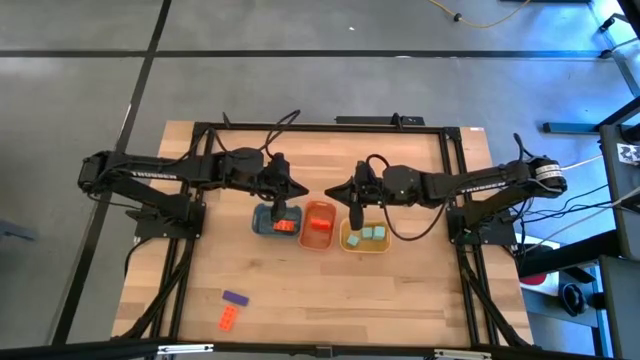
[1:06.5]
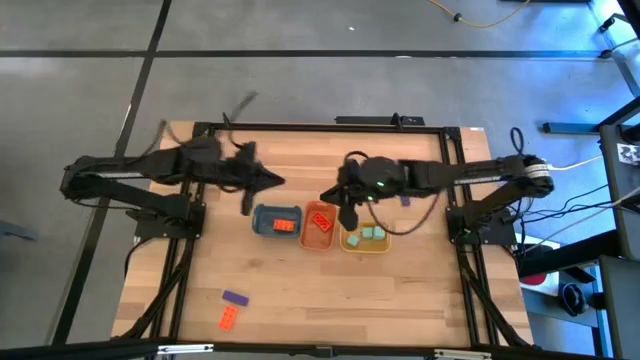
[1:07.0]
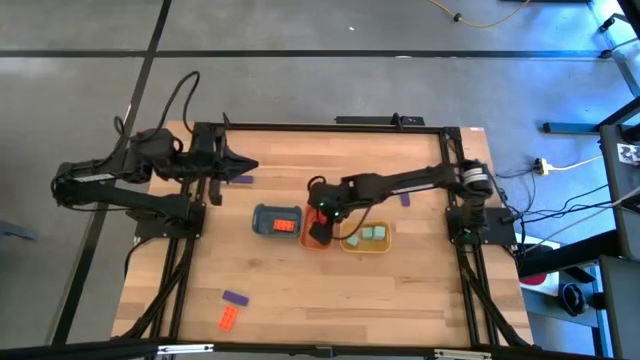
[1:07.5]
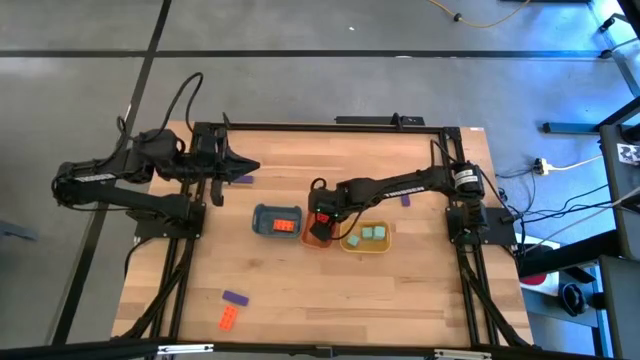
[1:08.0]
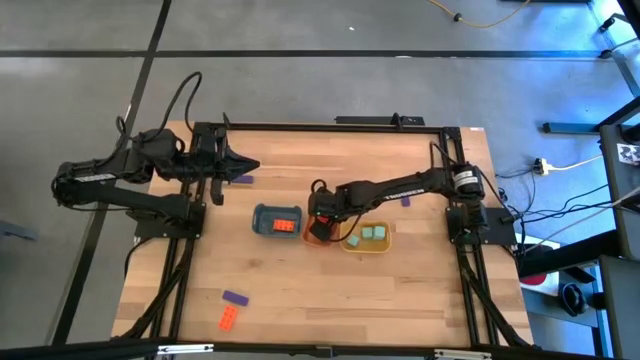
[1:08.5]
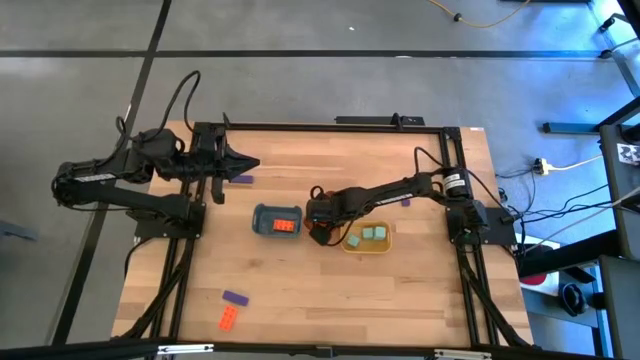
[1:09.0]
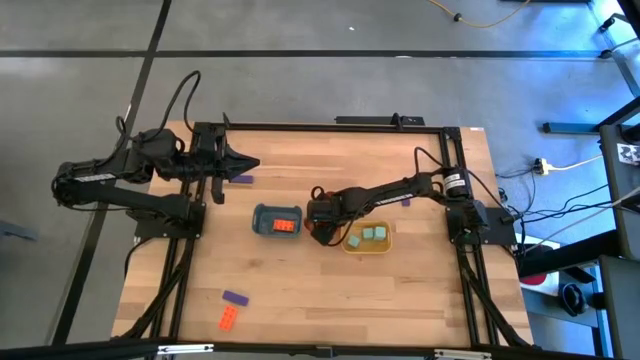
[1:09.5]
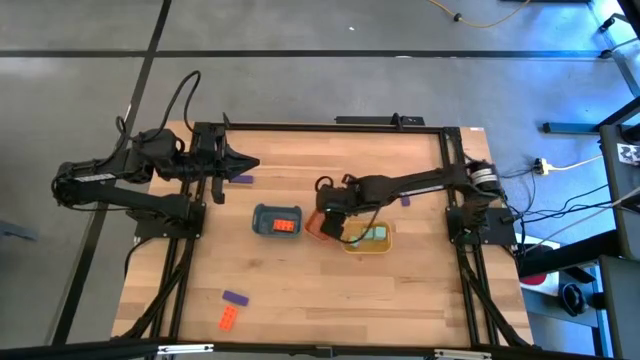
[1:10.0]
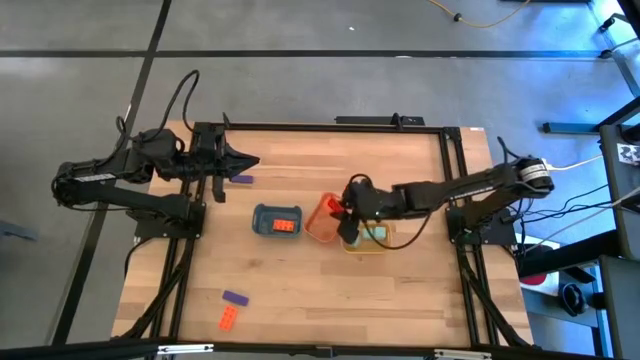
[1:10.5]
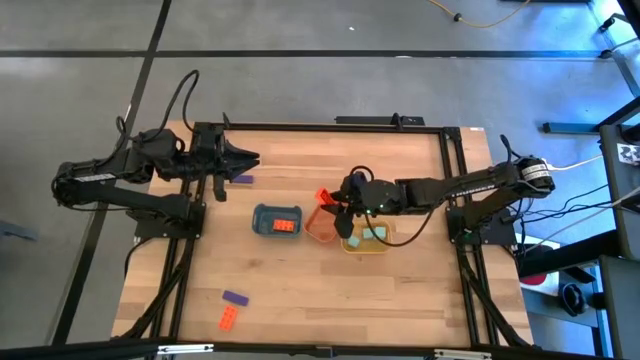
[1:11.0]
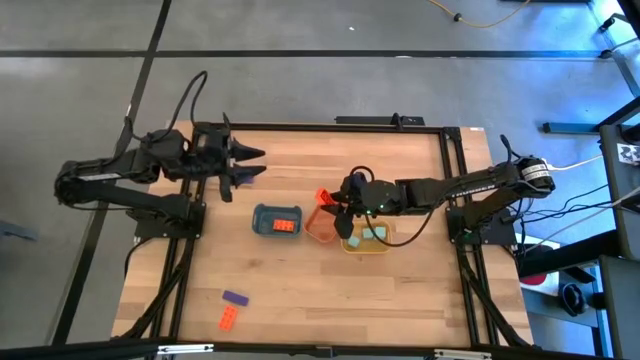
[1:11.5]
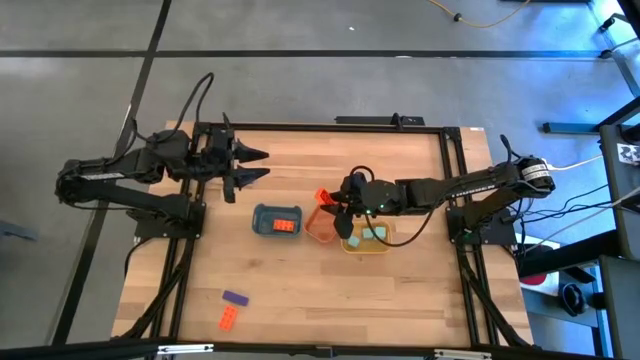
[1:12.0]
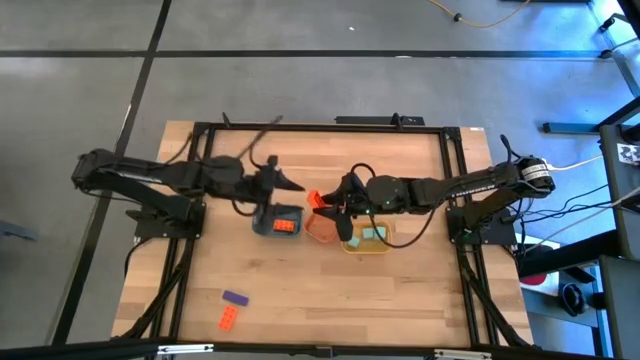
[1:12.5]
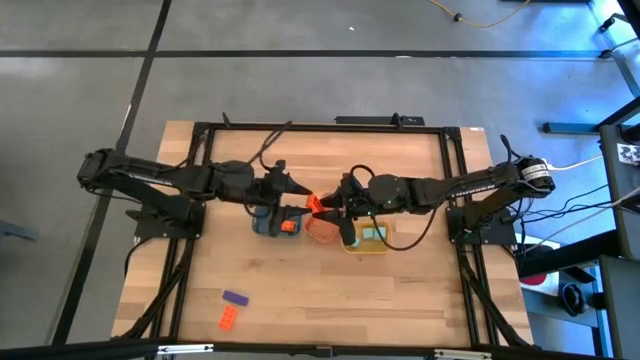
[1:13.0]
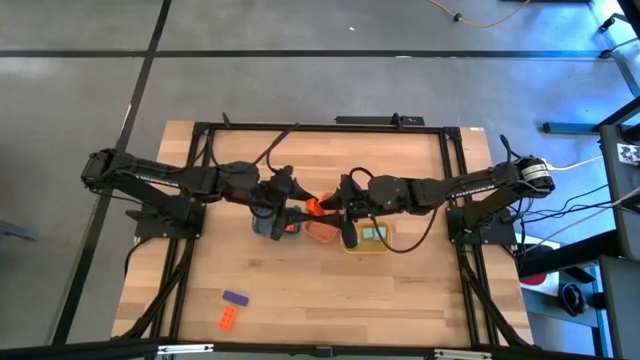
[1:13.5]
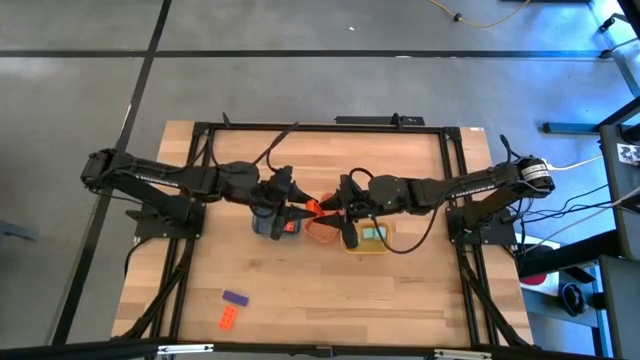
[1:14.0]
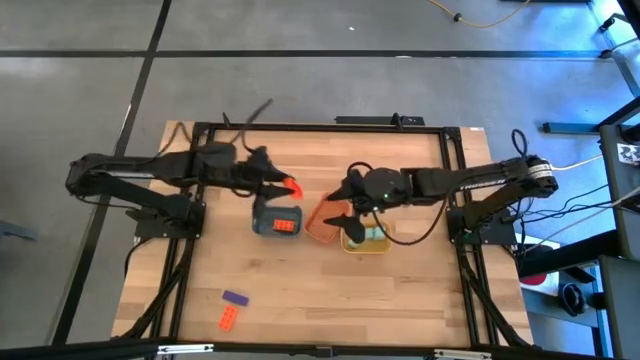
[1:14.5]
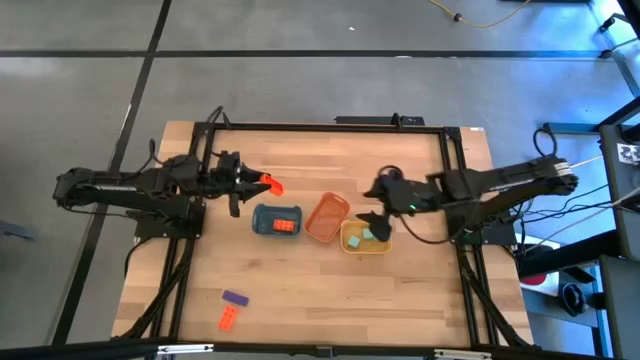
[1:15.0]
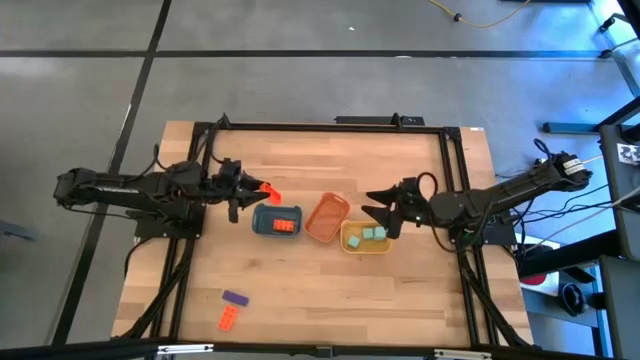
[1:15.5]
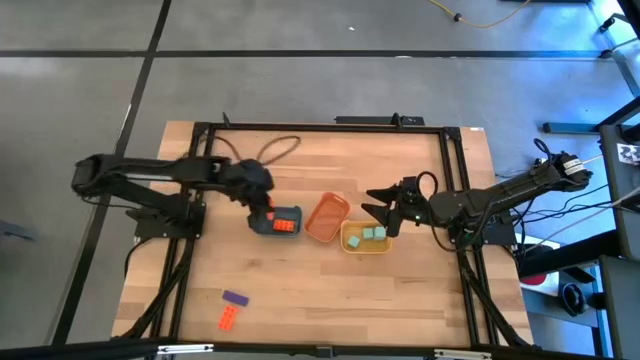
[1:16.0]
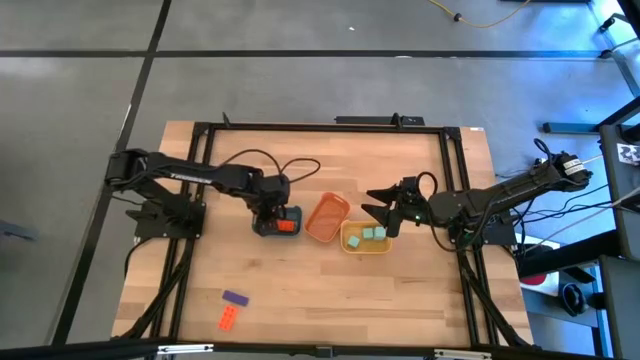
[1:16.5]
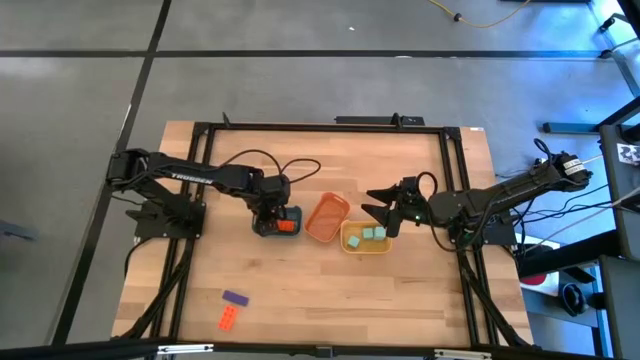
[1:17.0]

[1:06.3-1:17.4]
Task: Sort & place blocks by color
Put the right orange rectangular block into the blue bin

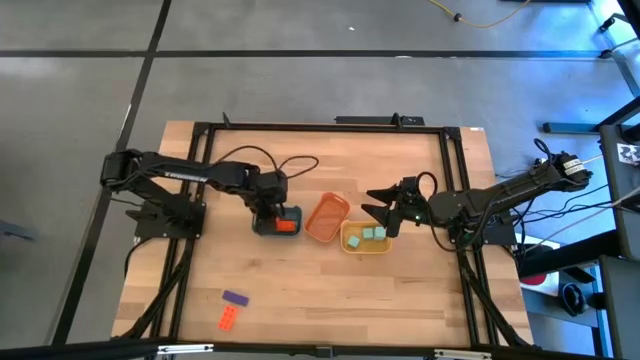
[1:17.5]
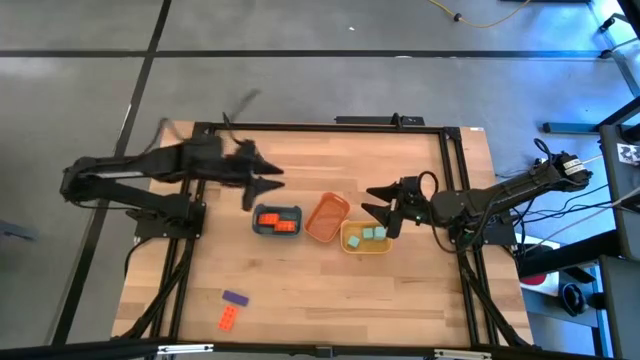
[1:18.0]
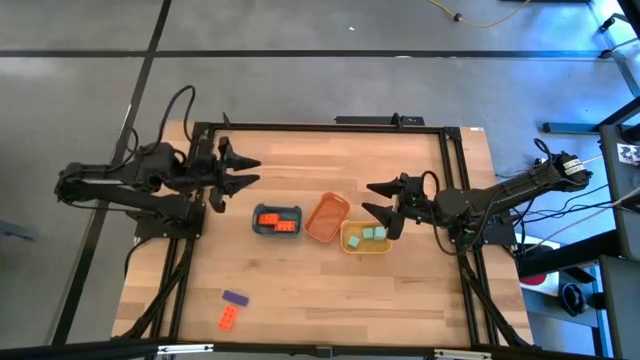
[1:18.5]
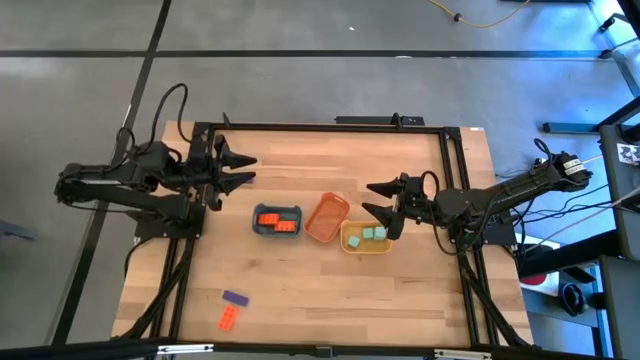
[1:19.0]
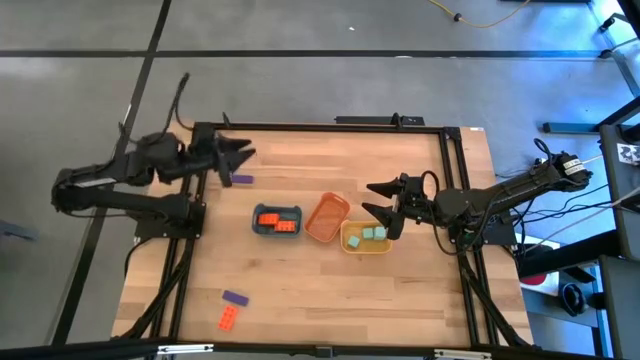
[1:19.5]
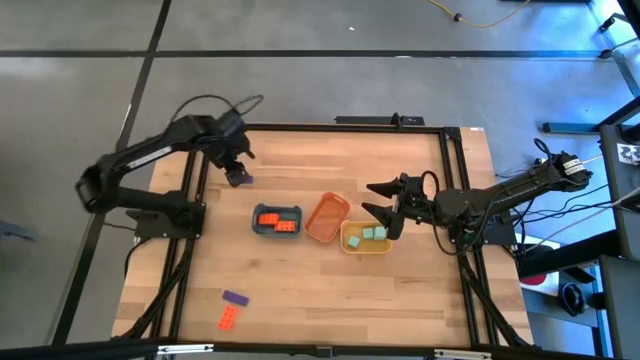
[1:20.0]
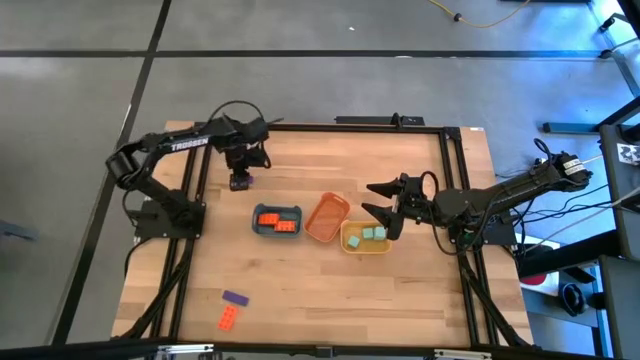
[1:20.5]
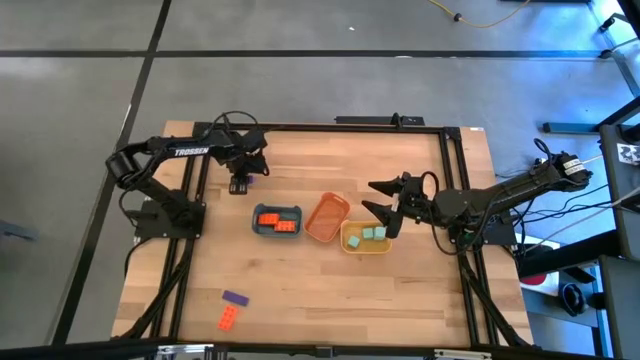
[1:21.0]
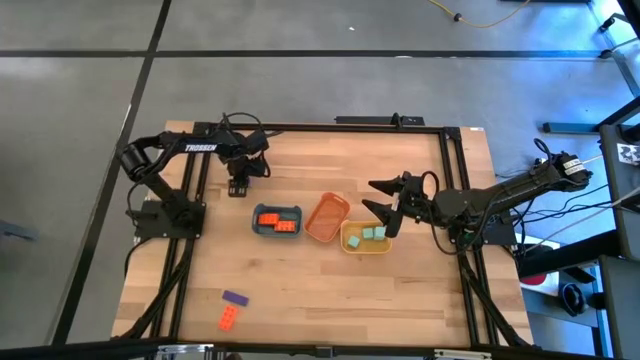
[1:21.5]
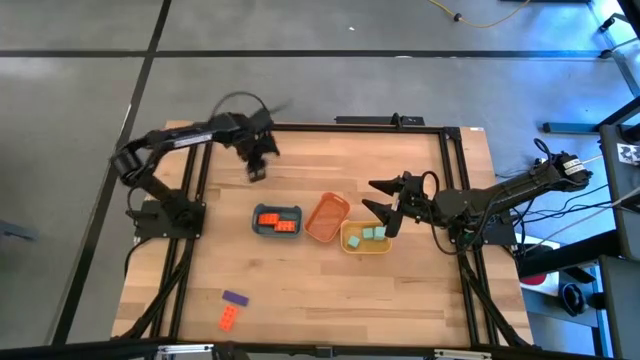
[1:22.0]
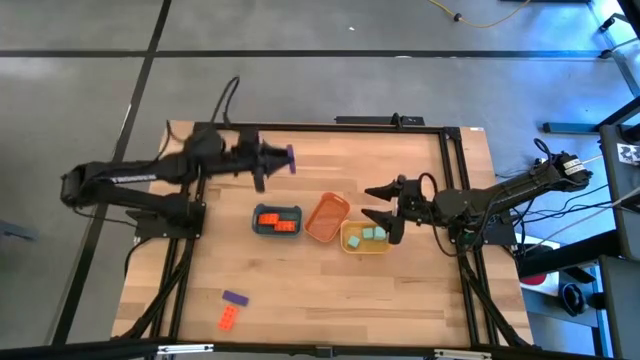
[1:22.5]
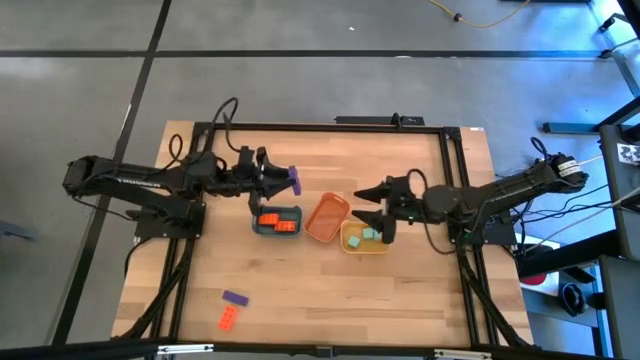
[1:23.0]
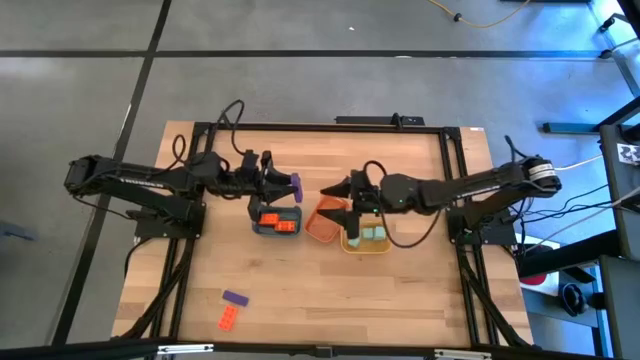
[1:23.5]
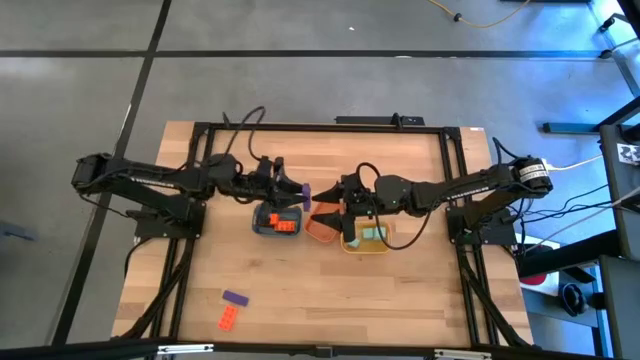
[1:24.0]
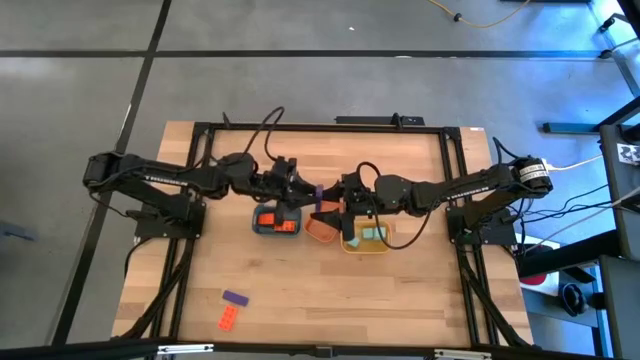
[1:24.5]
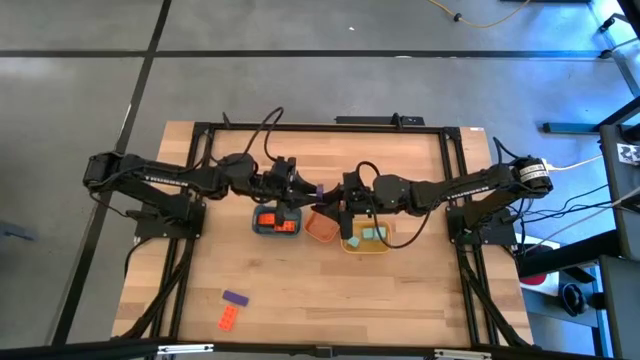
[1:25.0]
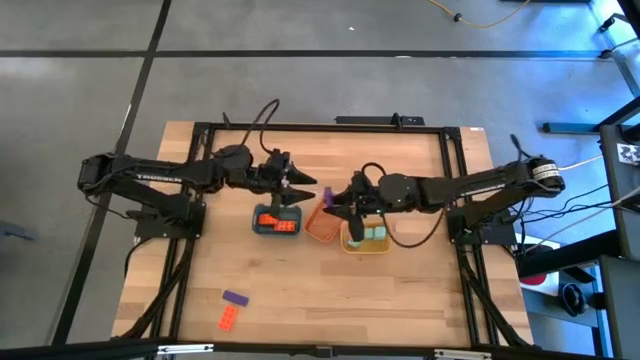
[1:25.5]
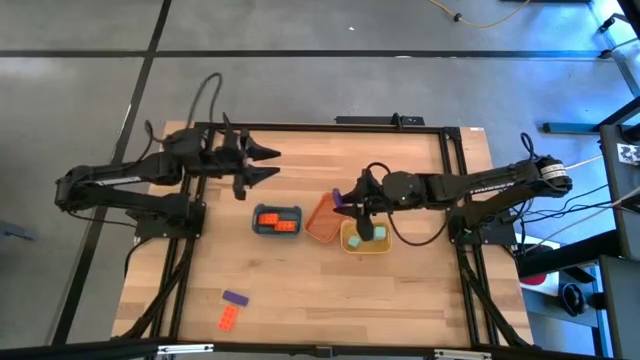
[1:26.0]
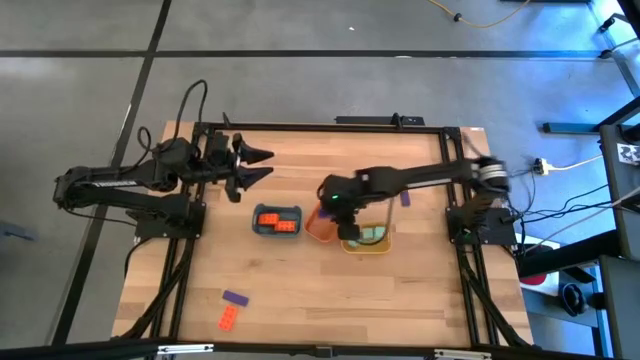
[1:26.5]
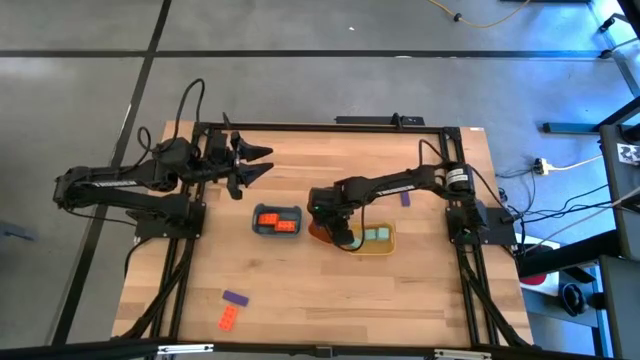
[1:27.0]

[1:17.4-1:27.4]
Put the top left purple rectangular block into the orange bin

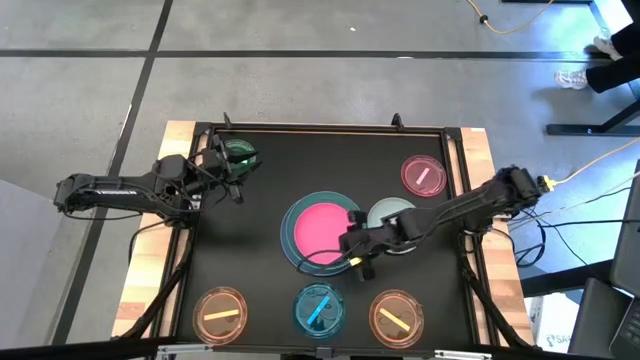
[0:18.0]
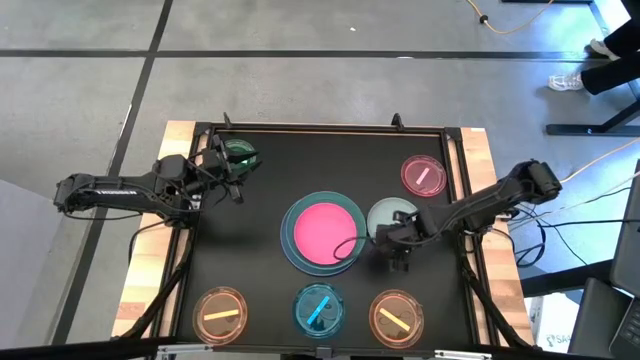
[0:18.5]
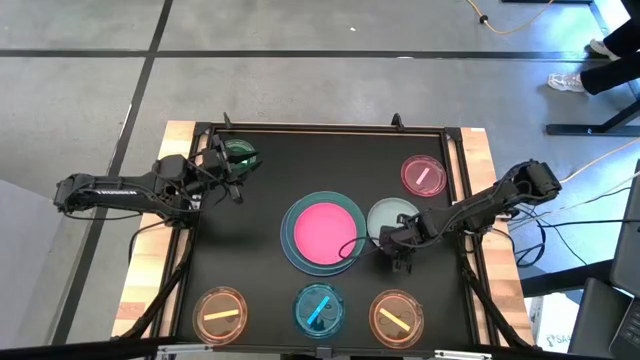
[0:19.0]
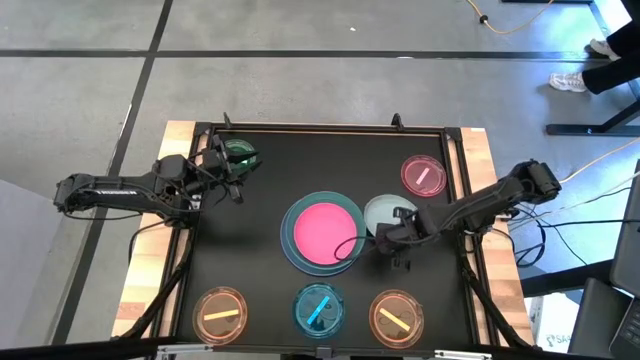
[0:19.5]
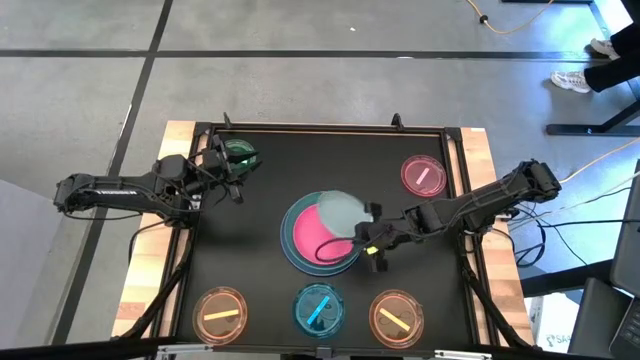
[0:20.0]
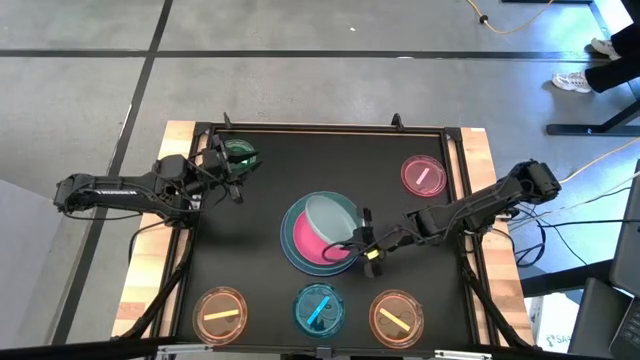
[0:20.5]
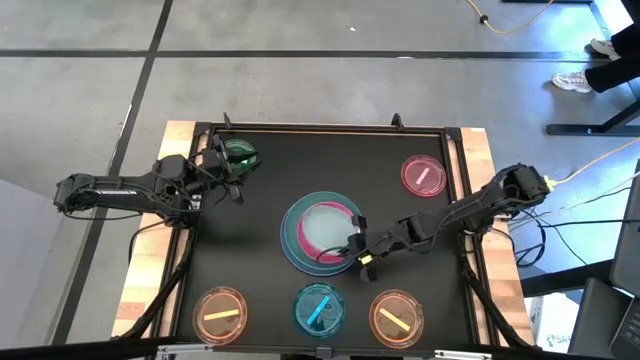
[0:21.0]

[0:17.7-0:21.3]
Task: Stack plastic plates
Stack the gray plate on top of the pink plate
